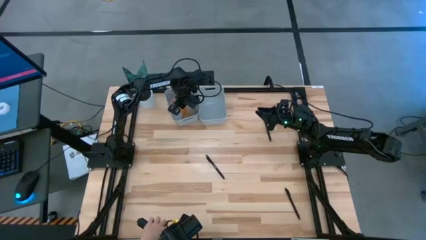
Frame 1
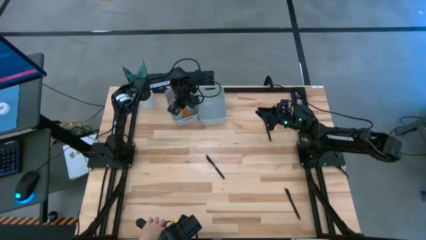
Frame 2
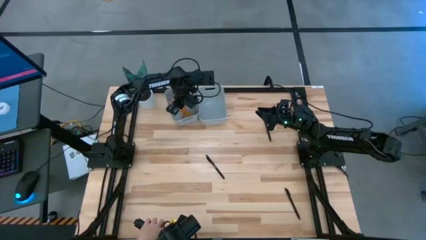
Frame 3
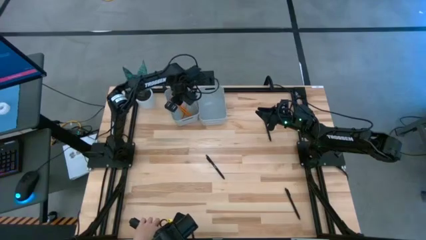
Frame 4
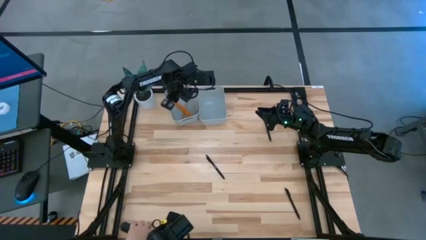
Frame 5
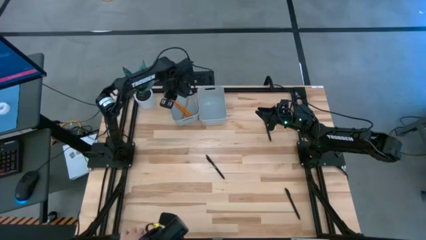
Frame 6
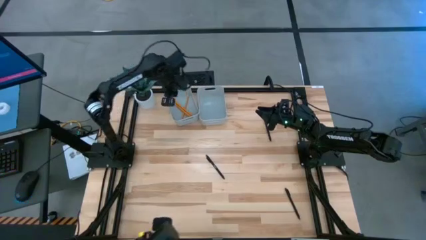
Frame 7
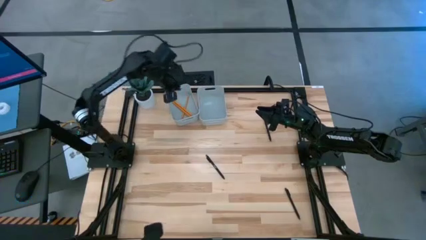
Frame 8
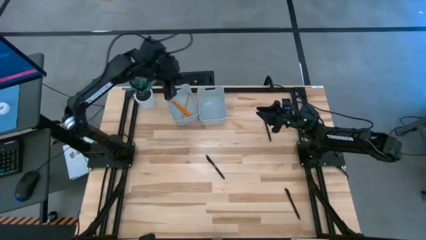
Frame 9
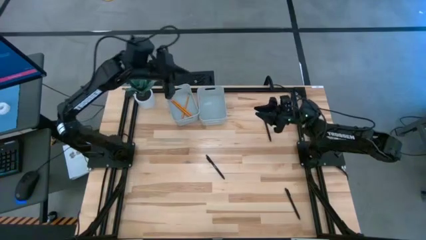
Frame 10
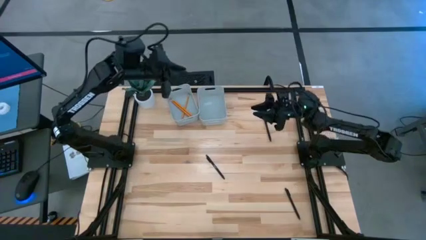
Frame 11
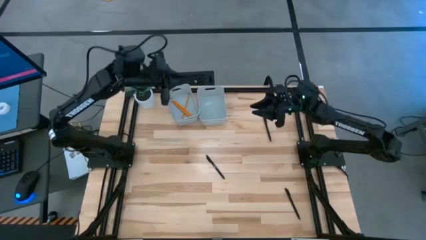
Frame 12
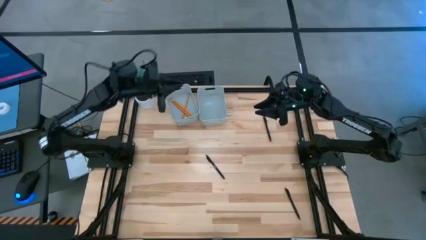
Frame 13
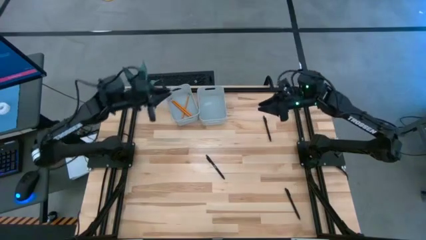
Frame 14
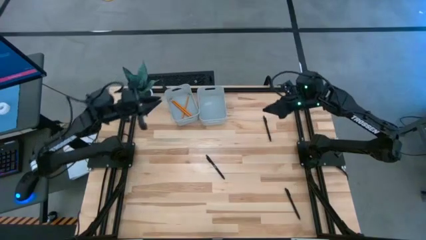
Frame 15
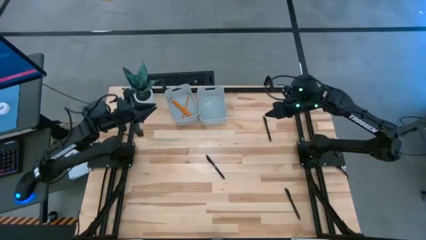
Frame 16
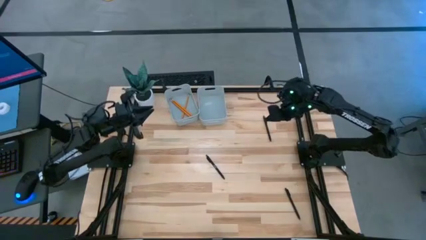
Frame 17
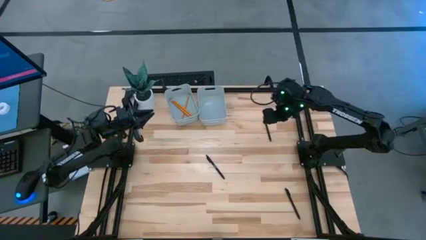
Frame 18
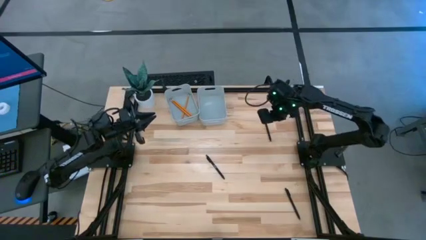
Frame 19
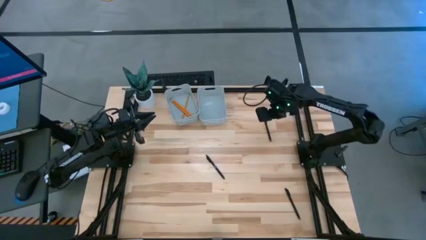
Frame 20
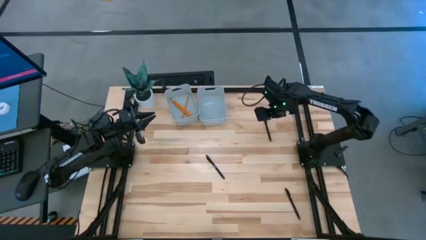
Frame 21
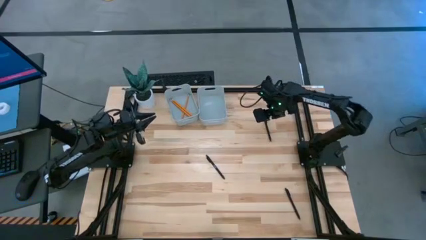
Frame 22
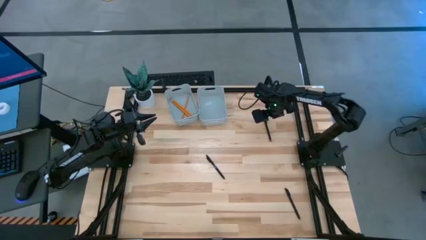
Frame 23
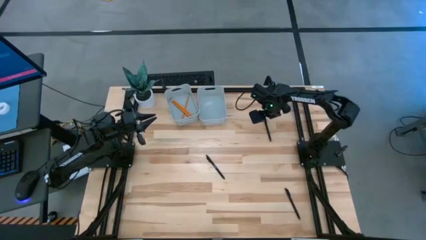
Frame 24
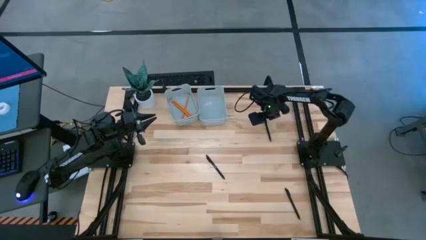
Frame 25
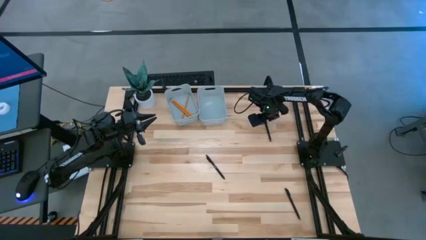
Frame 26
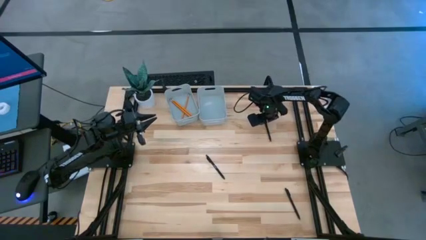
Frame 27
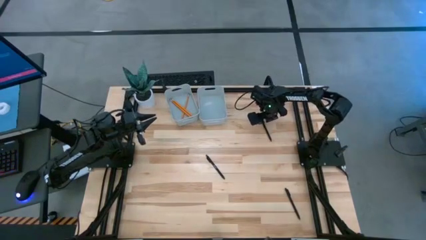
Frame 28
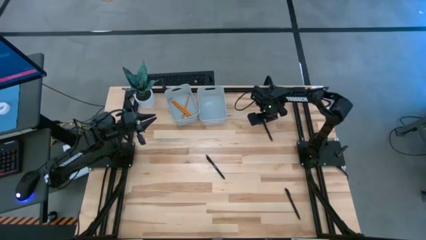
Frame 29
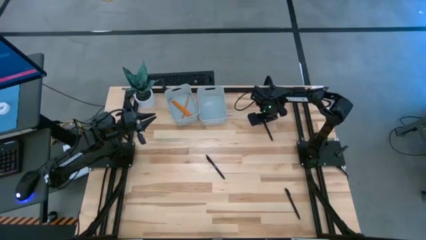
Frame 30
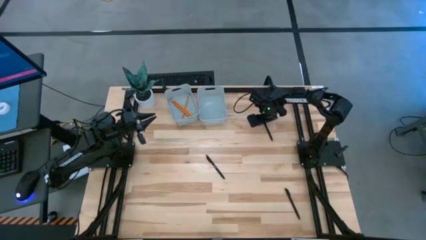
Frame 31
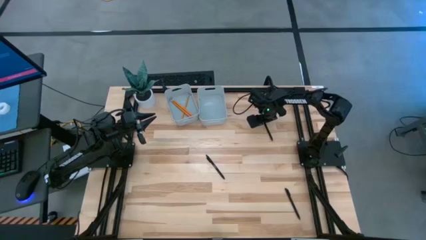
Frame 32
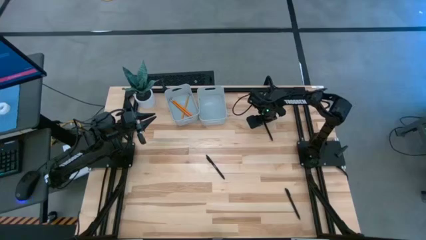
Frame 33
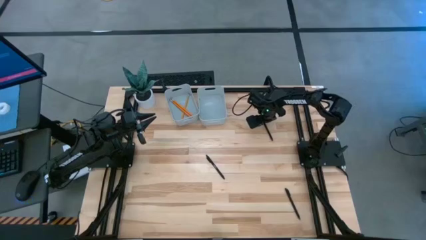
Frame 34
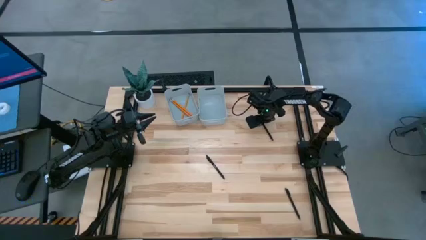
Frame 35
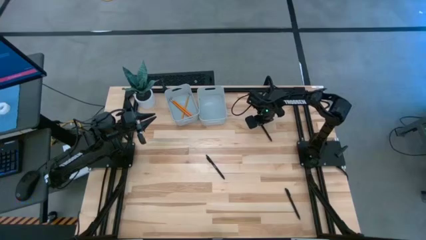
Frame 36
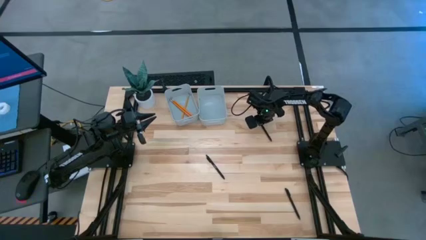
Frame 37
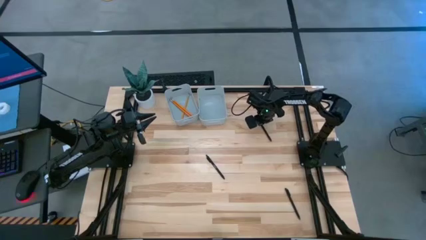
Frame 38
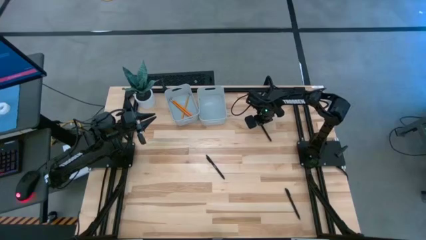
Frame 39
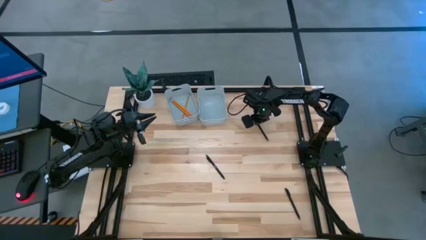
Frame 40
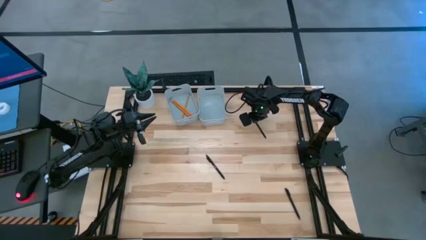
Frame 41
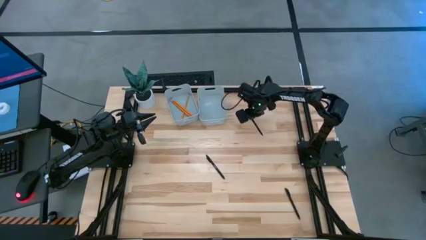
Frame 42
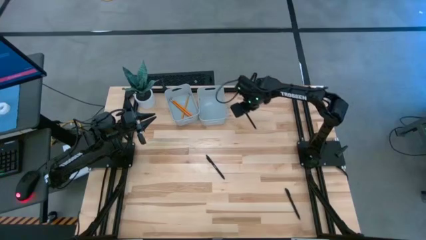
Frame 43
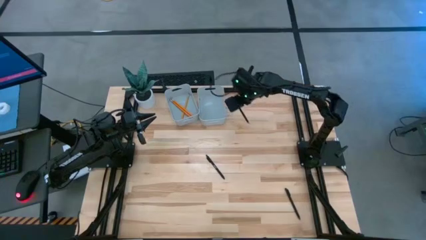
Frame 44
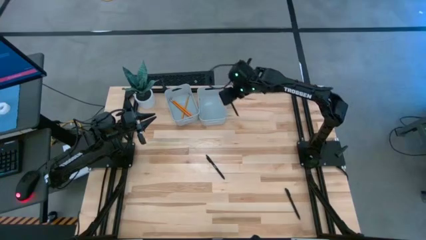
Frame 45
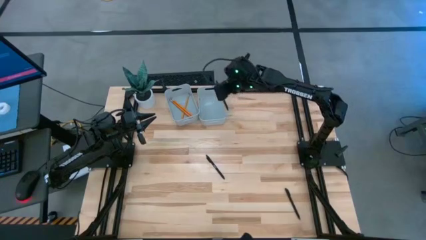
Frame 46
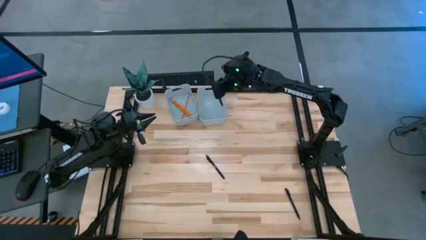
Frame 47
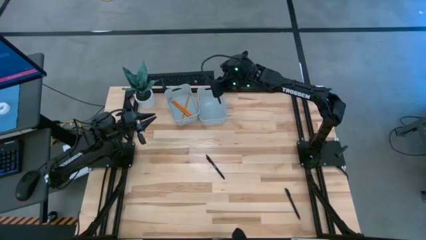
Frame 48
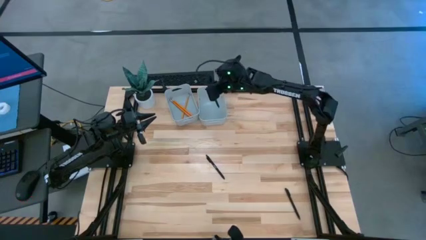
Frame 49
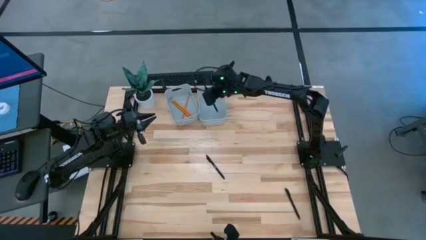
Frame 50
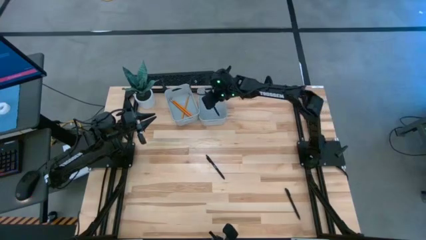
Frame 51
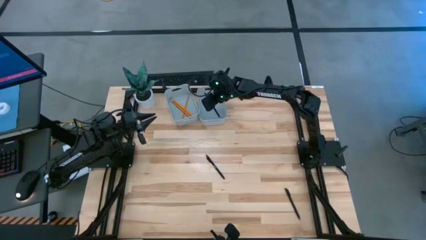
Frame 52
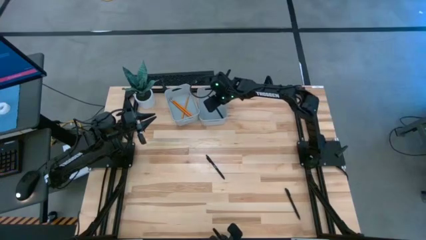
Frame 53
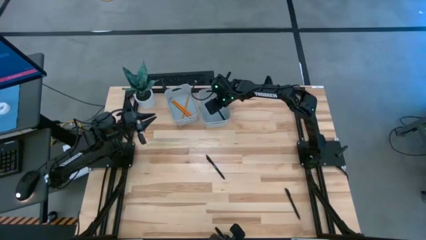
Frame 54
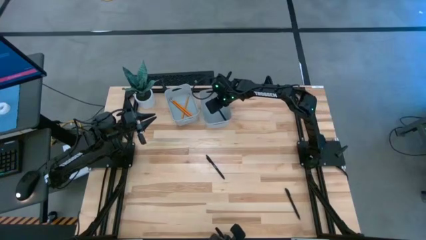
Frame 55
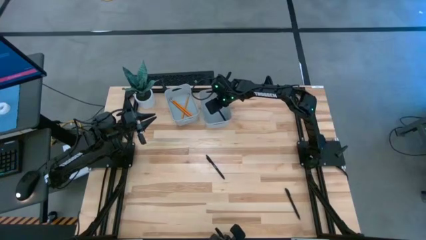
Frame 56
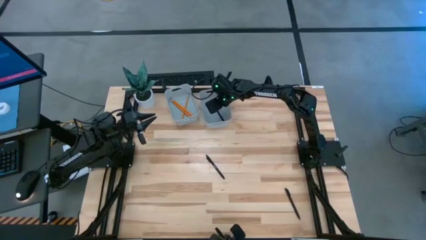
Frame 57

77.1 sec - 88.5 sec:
Task: Sort pens & pencils
Put the top black ballpen into the right bin
